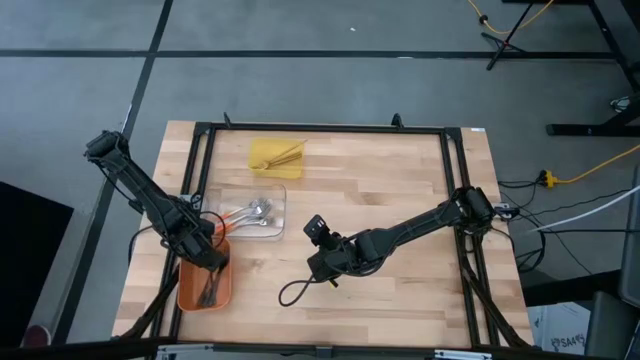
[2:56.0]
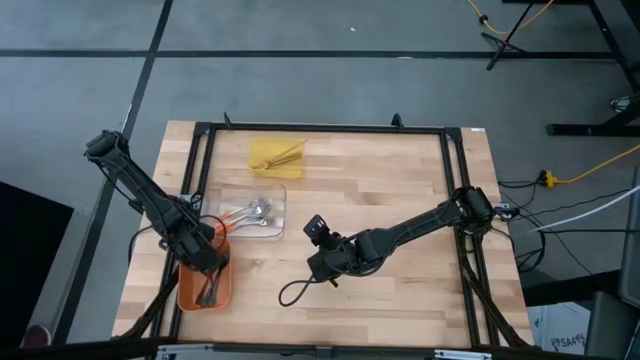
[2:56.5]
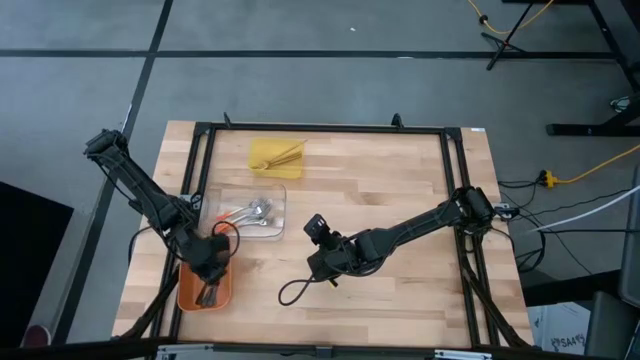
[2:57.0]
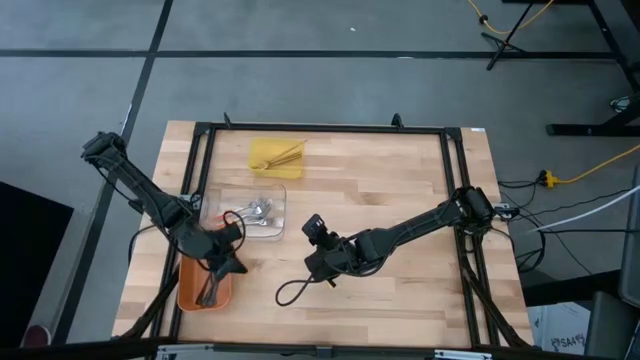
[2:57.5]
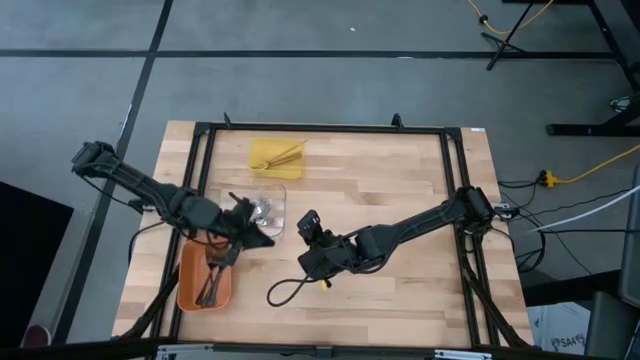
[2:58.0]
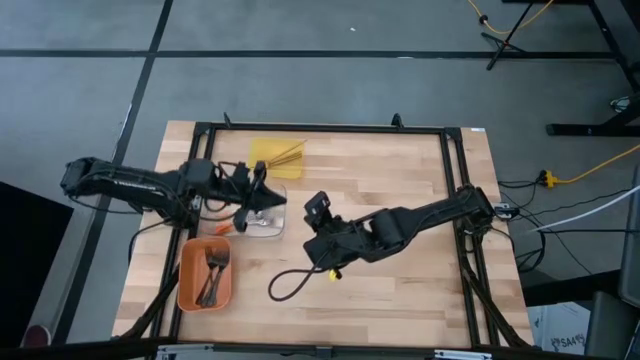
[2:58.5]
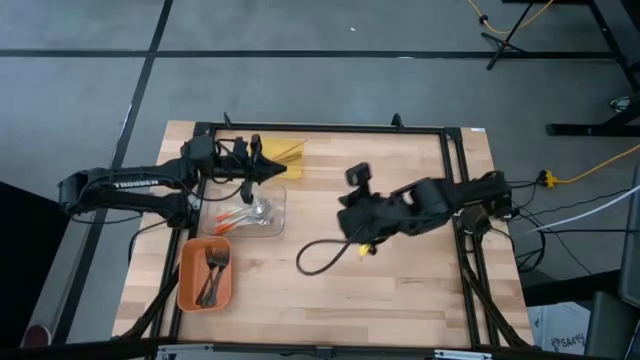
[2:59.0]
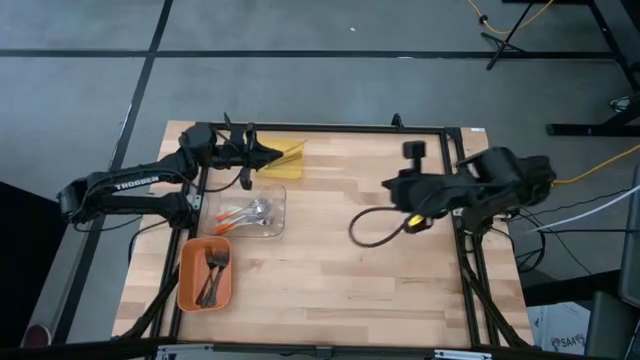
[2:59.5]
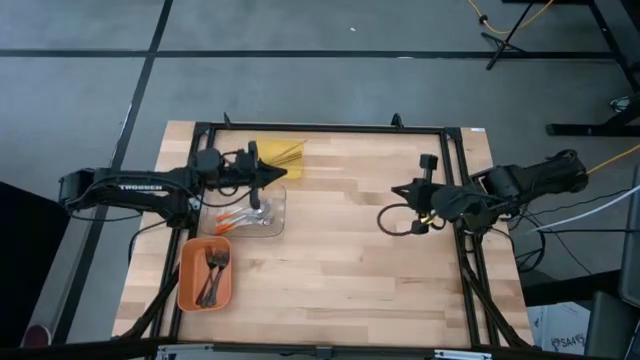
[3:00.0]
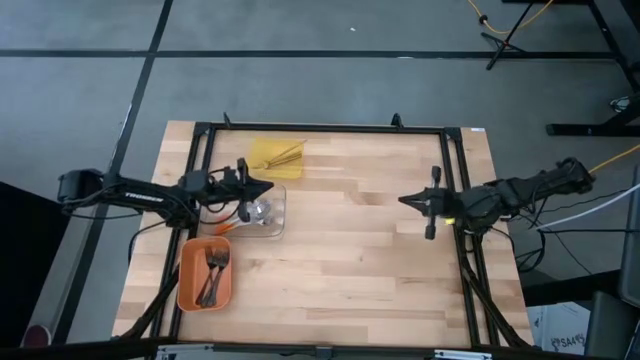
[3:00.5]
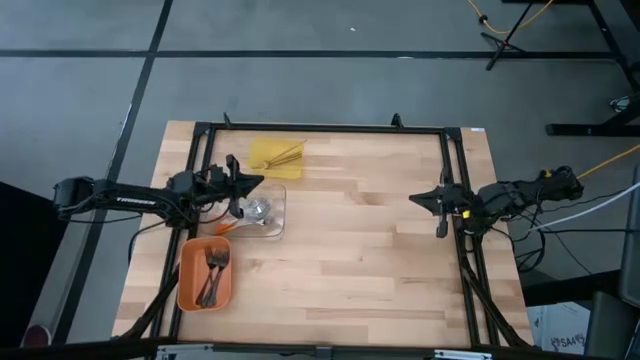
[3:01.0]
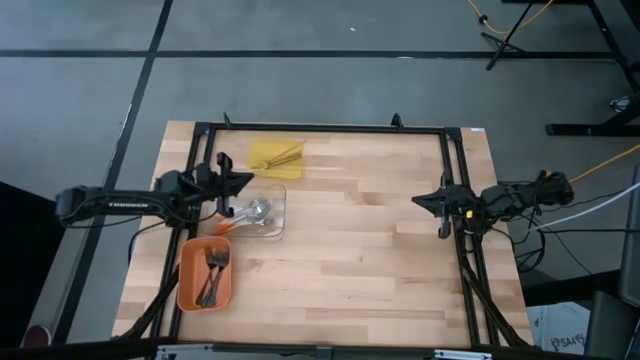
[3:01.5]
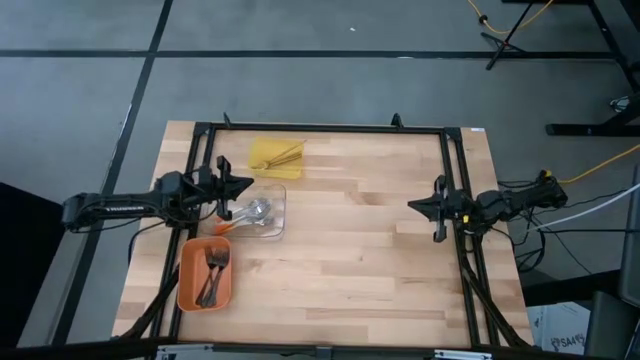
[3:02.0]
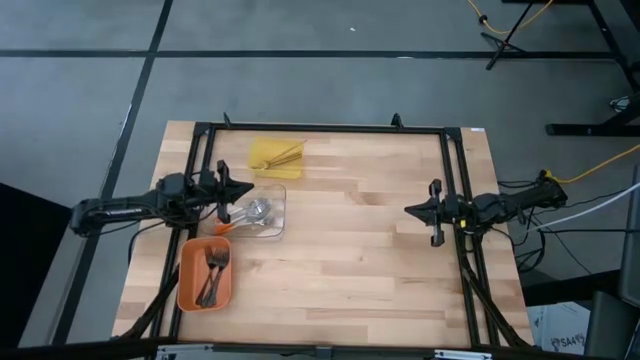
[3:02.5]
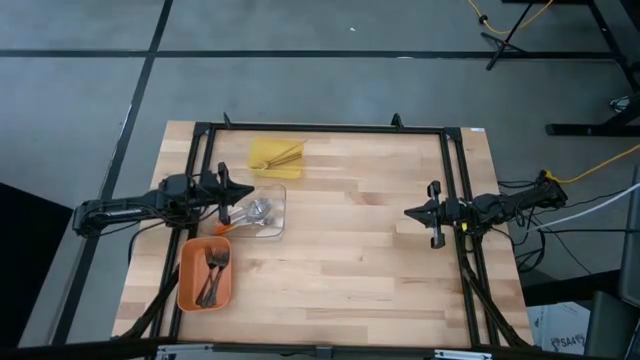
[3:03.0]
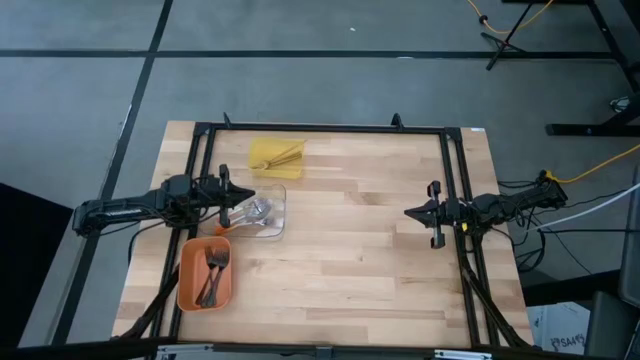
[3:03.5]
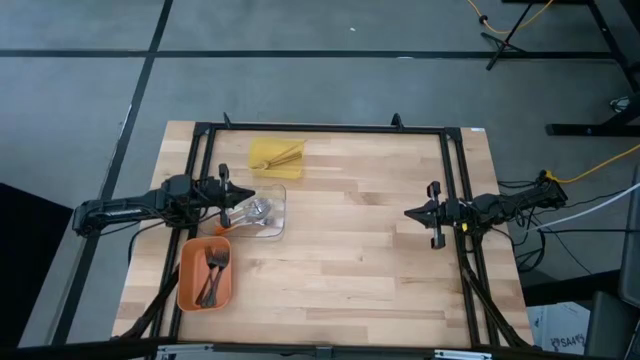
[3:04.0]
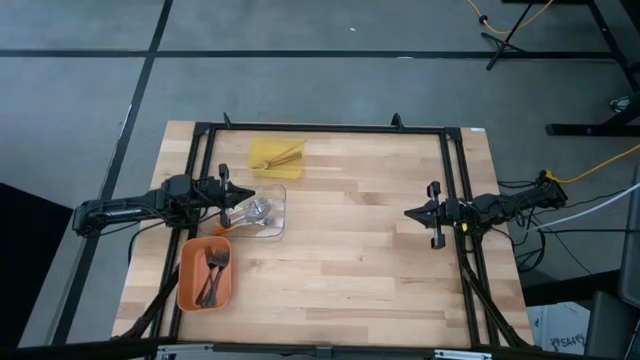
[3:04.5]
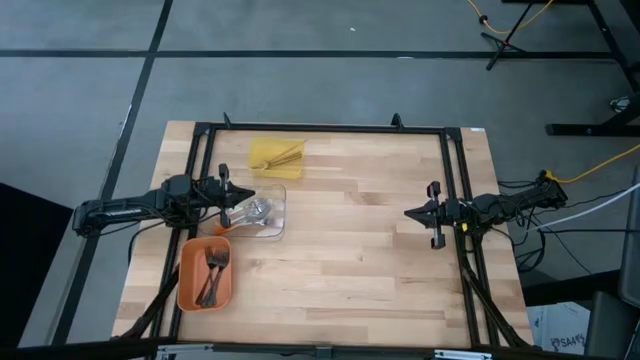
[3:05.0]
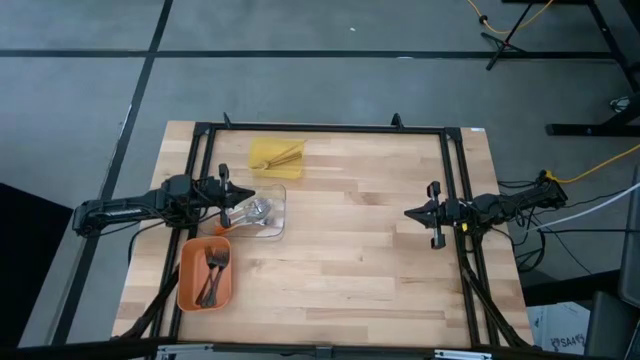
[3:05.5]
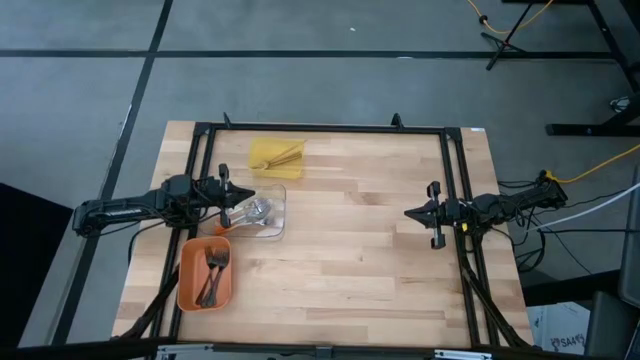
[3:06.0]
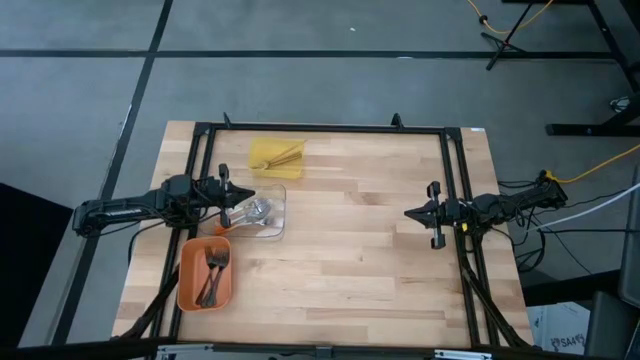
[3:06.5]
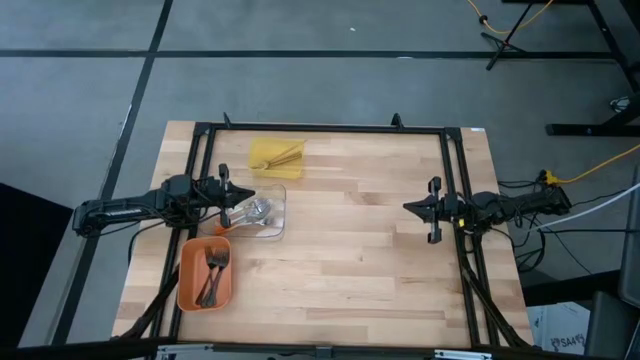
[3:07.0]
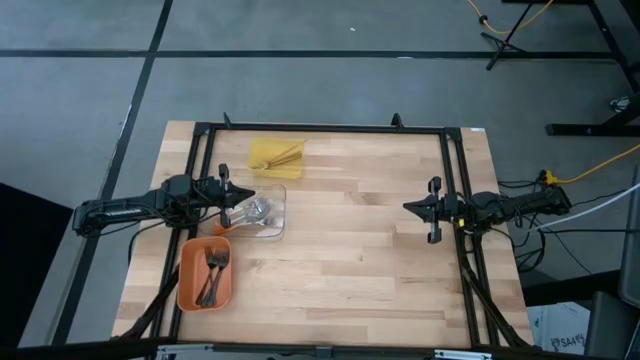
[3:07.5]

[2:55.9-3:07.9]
Task: Sort silverware by color (type)
Return to Home Position

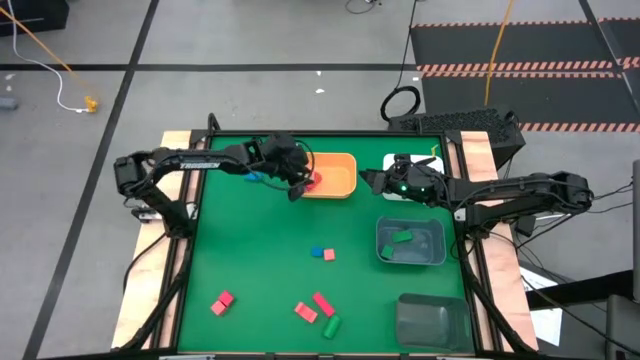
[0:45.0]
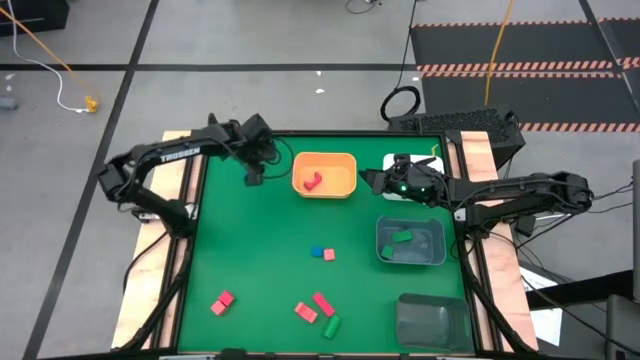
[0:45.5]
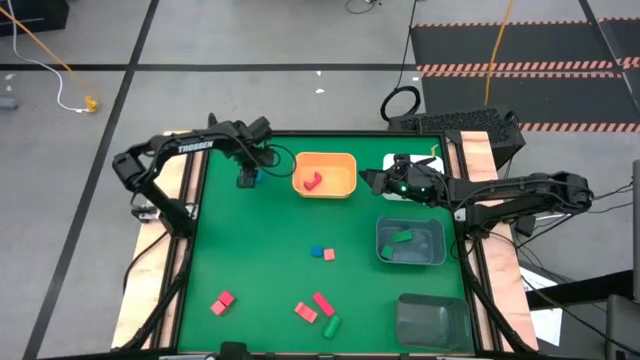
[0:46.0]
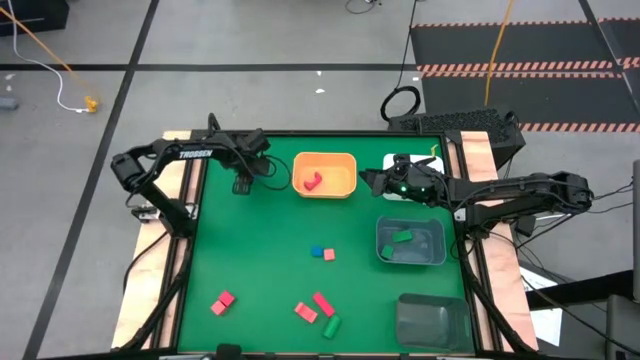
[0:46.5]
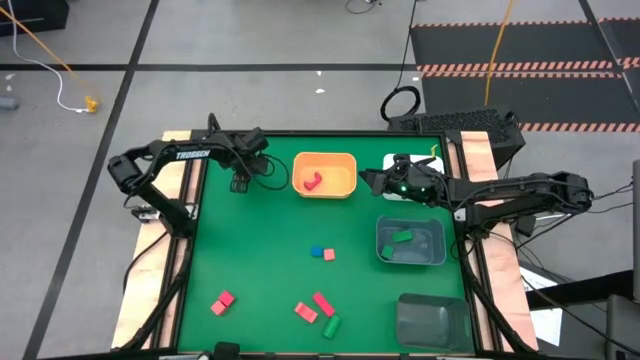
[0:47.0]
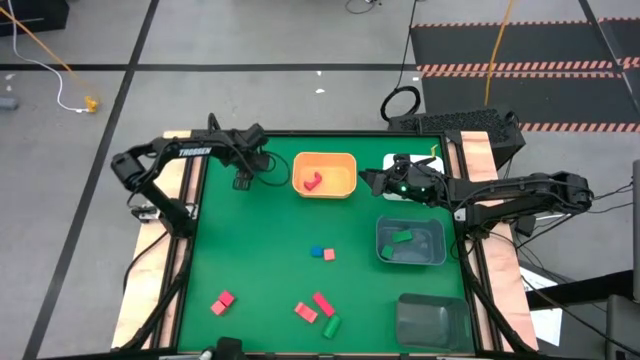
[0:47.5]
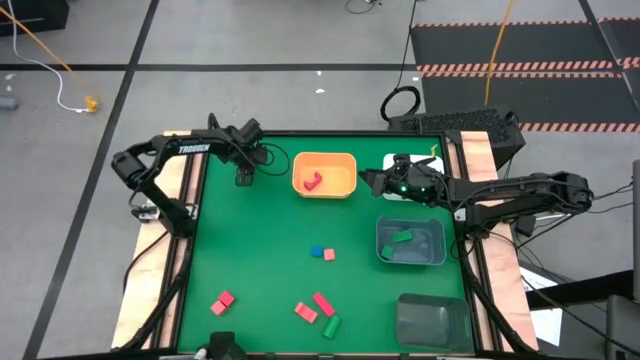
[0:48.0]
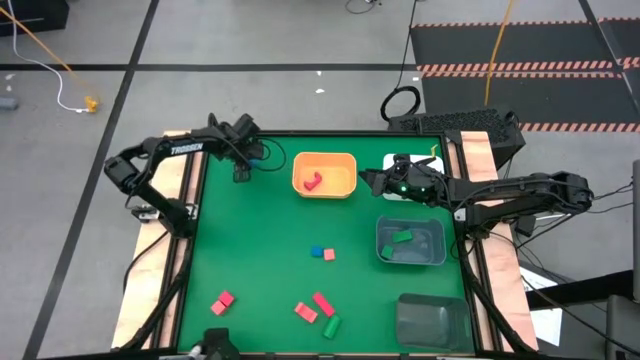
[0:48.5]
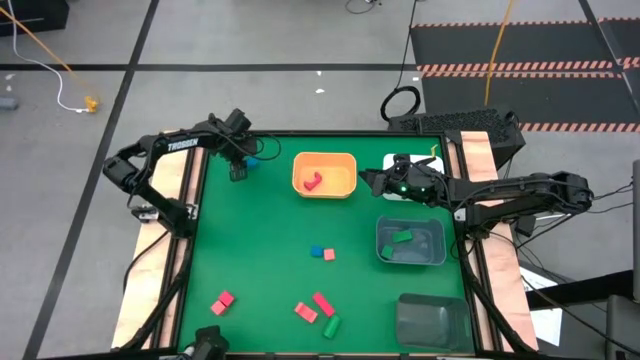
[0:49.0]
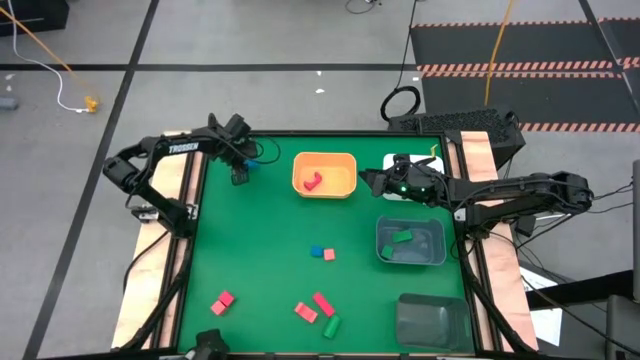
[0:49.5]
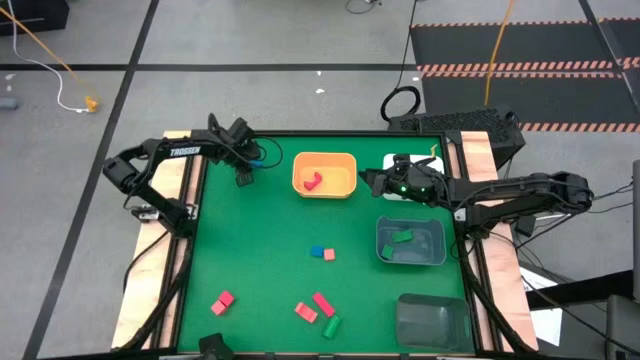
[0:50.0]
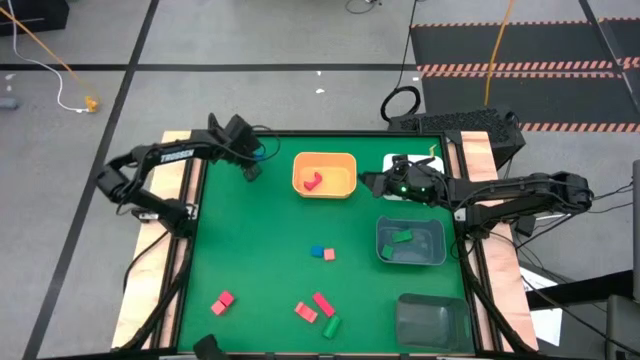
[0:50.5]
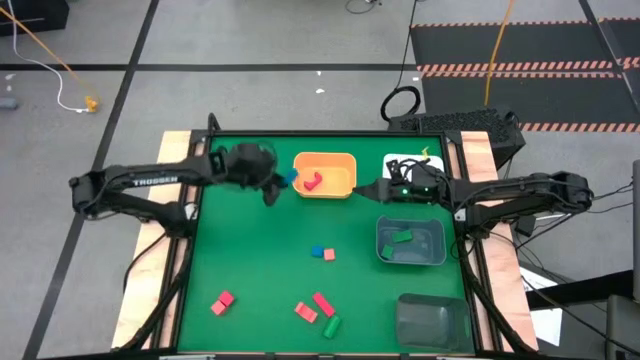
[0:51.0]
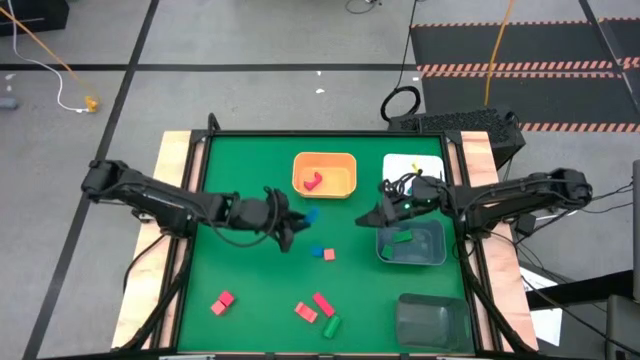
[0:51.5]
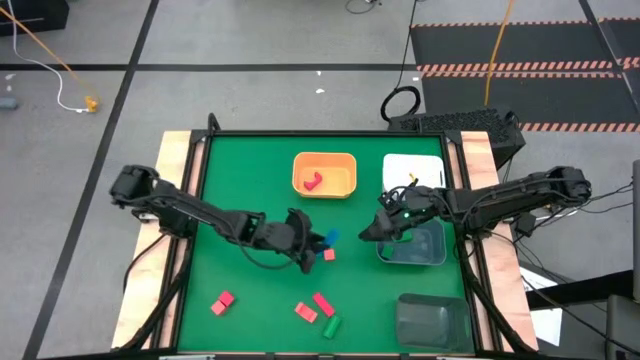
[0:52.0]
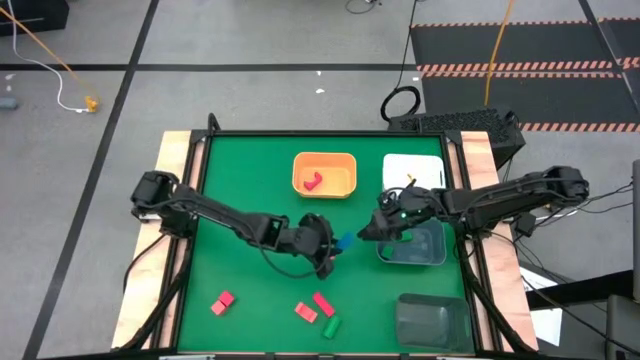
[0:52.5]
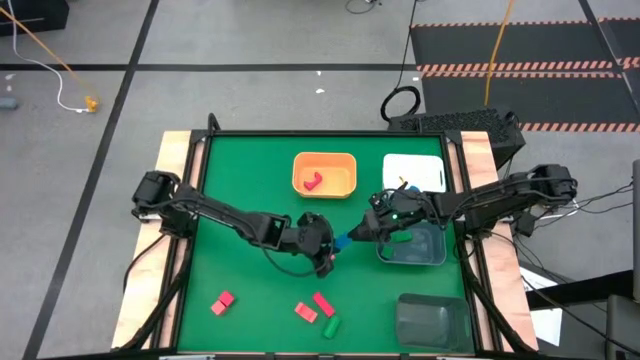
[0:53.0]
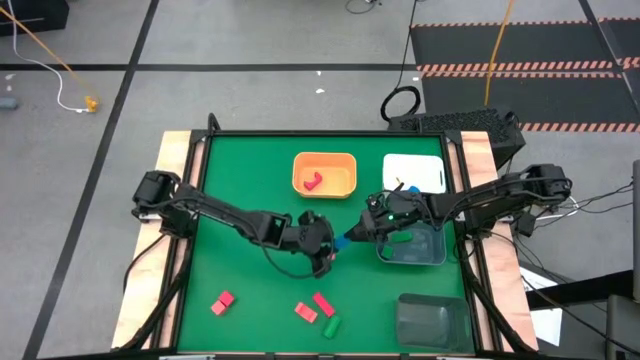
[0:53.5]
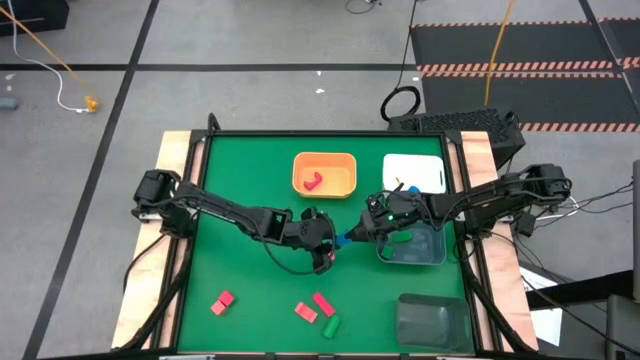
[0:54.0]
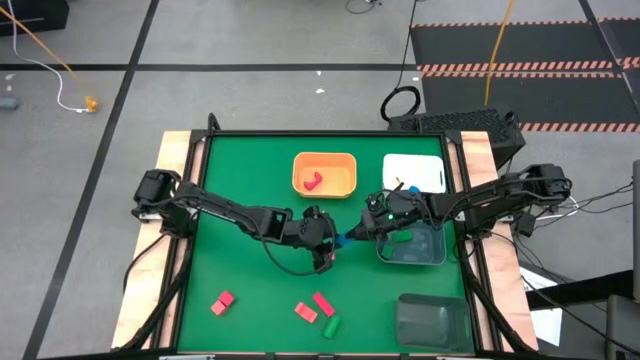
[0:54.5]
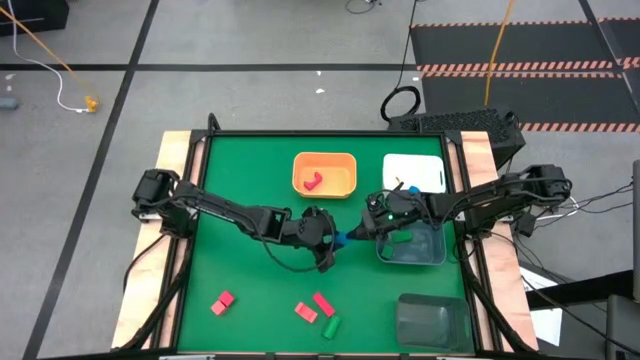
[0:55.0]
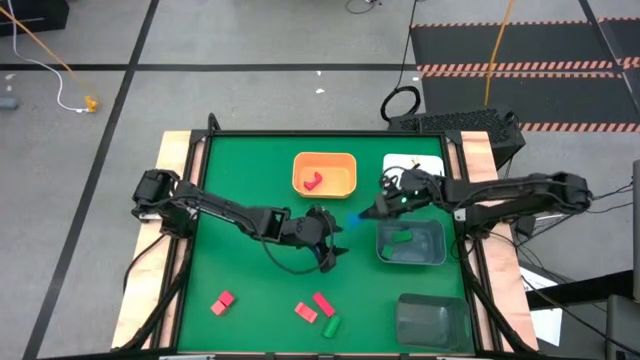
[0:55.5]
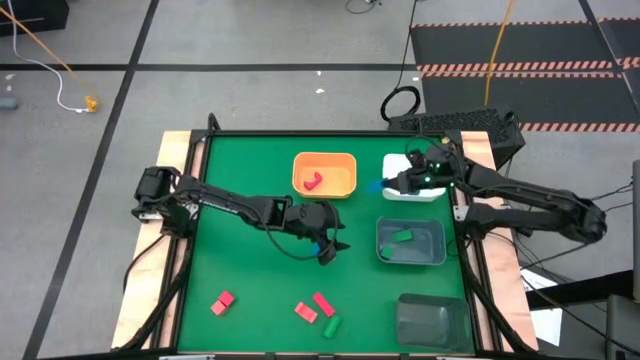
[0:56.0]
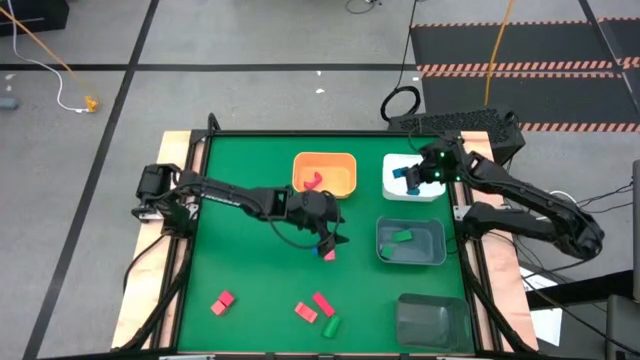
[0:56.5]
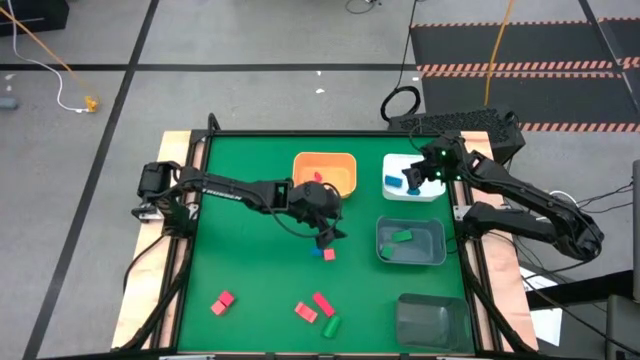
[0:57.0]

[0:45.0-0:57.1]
Task: Sort & place blocks by color
Put the top blue block into the white bin
